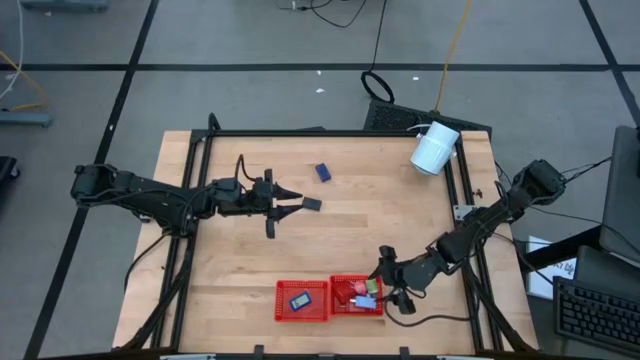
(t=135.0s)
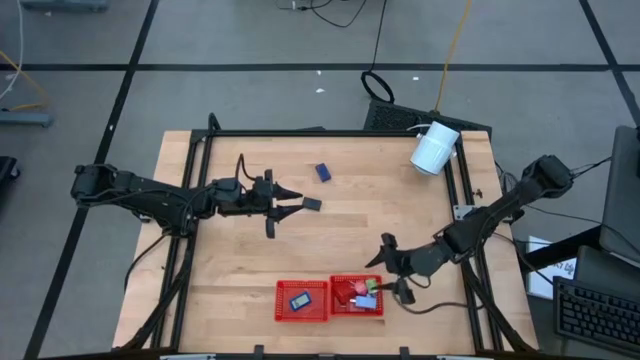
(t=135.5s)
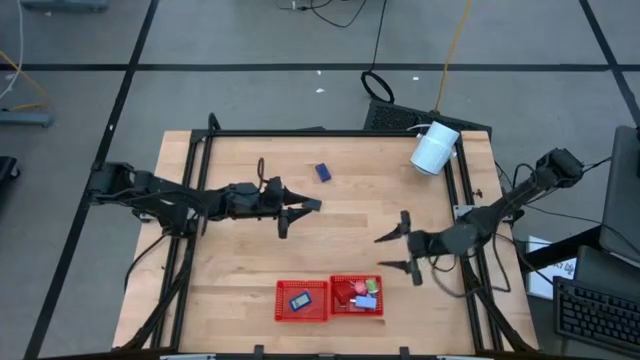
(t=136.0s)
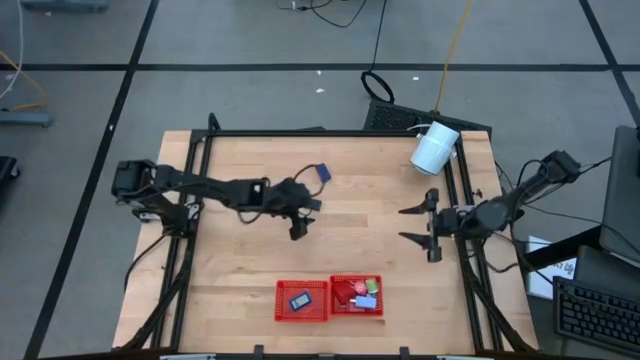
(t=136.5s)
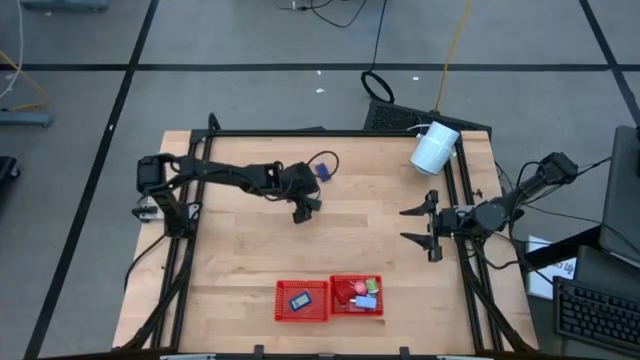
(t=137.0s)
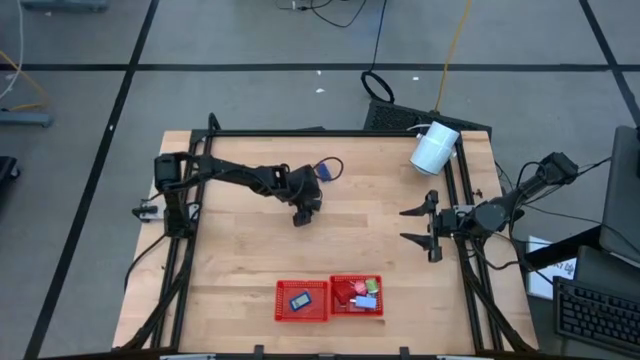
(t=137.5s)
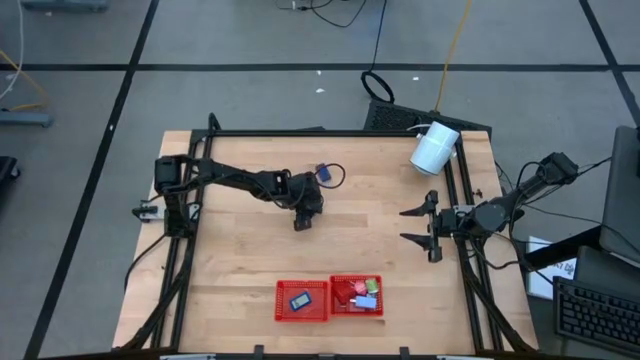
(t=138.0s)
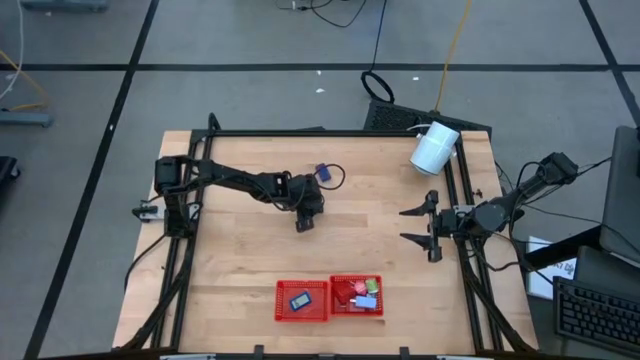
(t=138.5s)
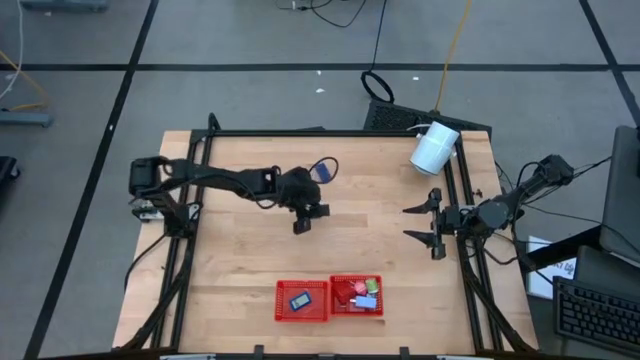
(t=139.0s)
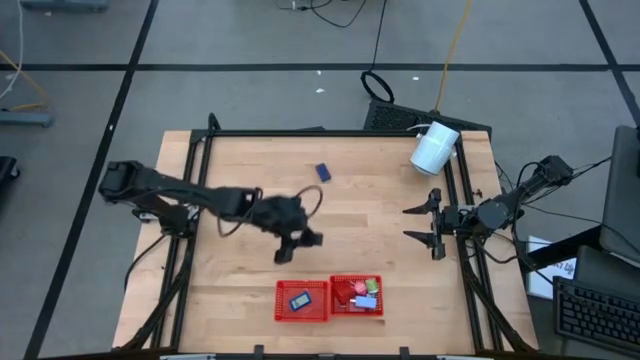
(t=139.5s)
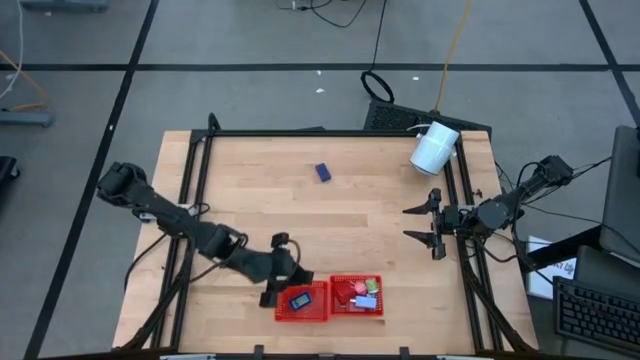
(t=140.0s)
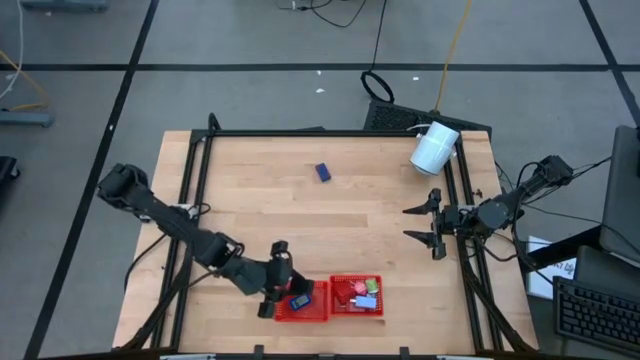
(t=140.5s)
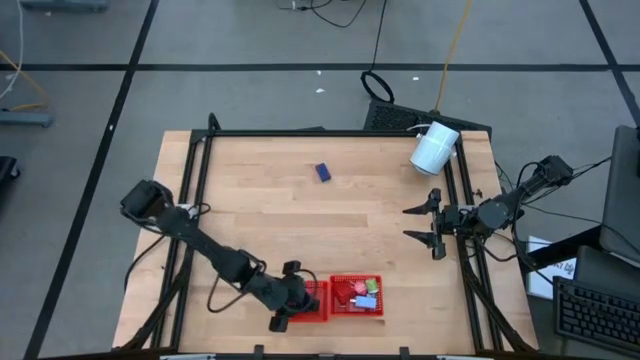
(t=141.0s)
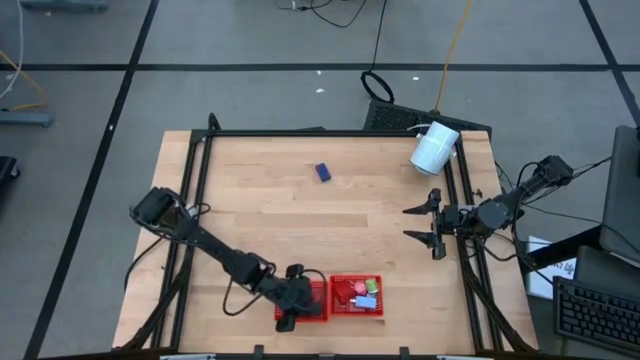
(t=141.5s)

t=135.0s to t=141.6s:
Task: Pick & Place Office items
Put the black digital timer into the left red bin

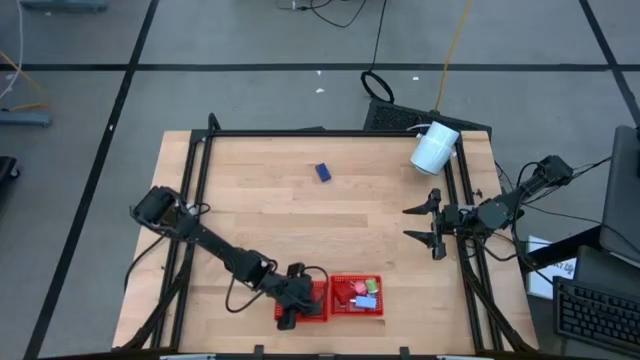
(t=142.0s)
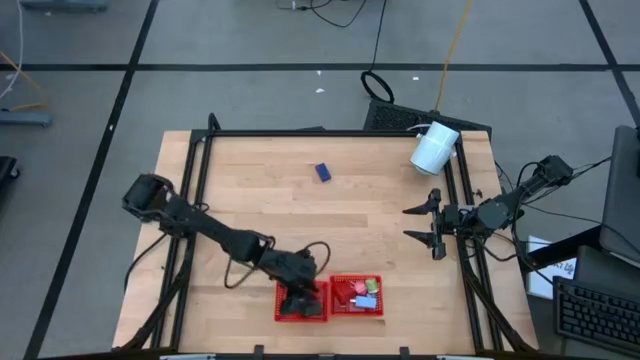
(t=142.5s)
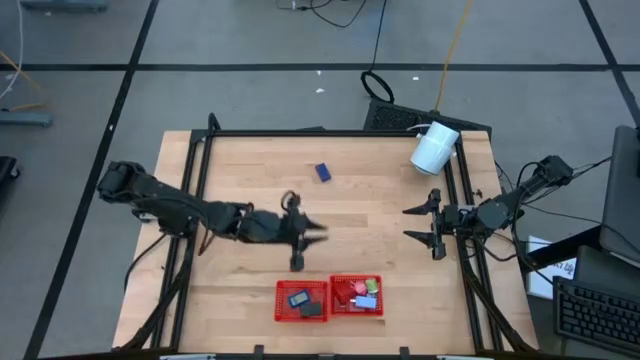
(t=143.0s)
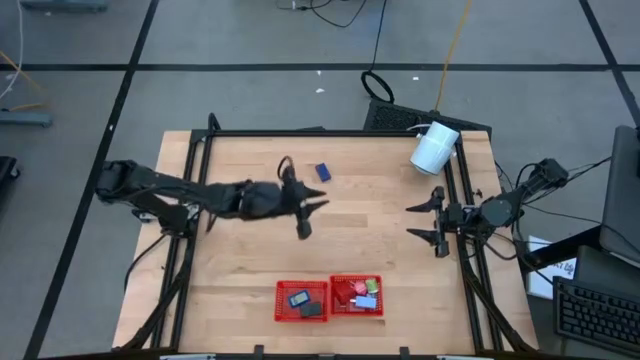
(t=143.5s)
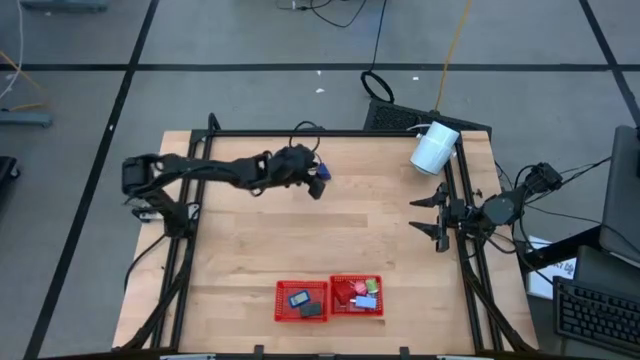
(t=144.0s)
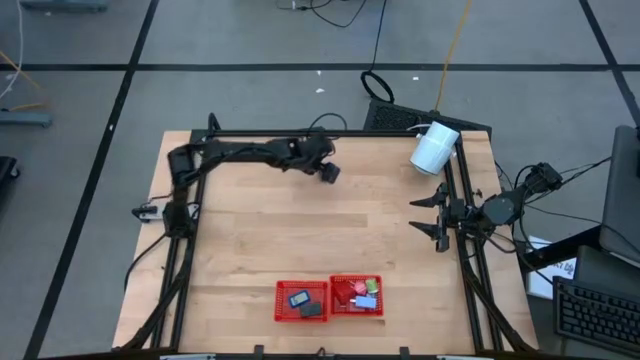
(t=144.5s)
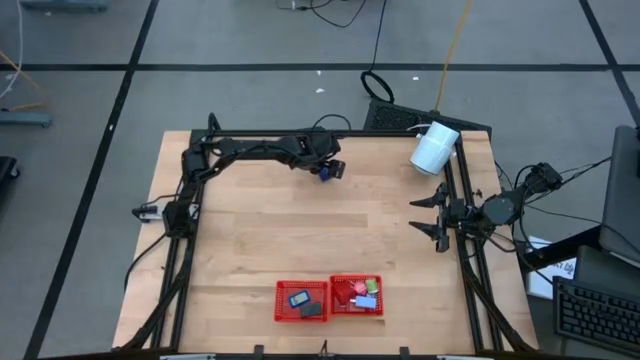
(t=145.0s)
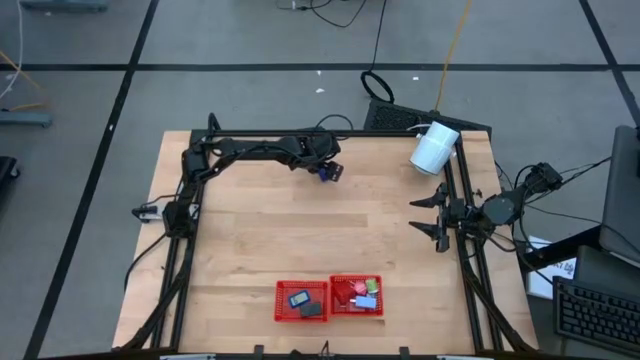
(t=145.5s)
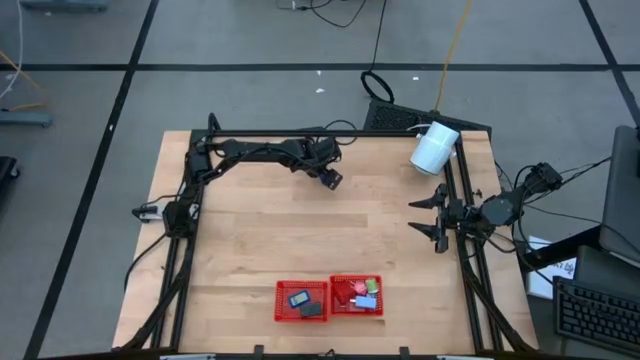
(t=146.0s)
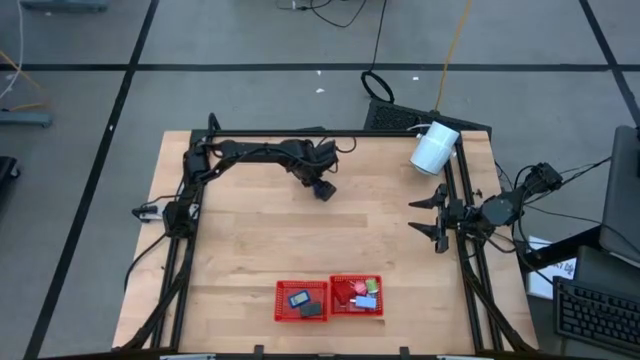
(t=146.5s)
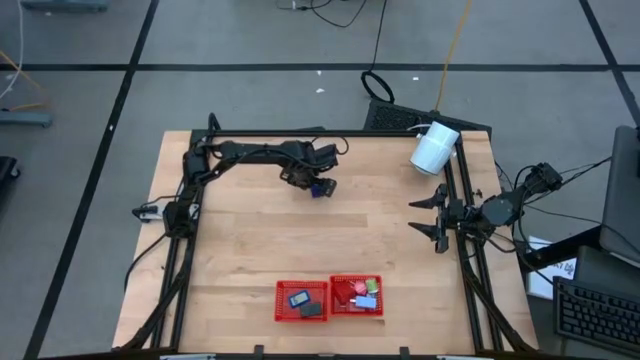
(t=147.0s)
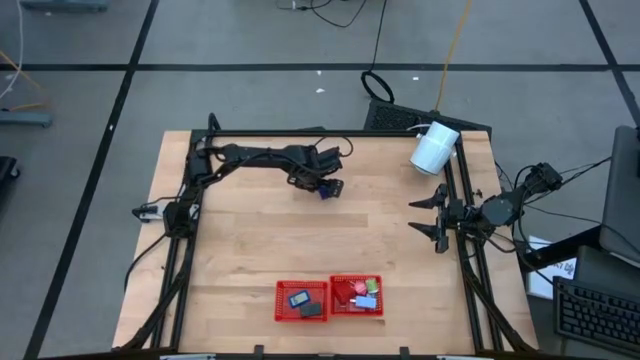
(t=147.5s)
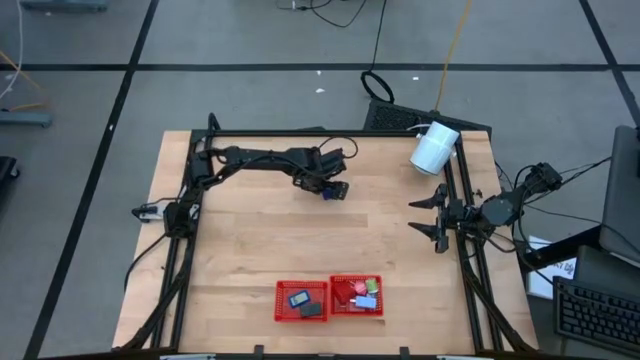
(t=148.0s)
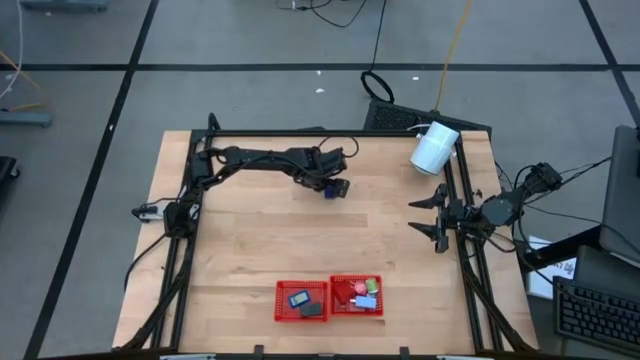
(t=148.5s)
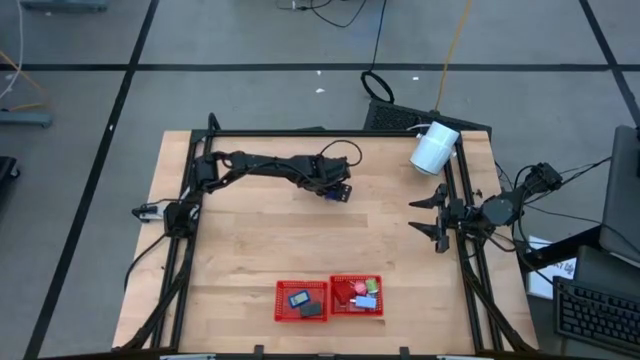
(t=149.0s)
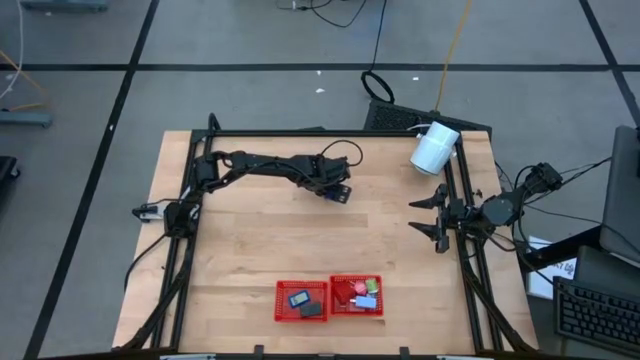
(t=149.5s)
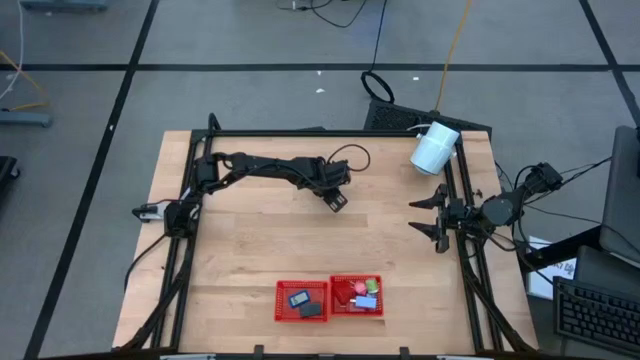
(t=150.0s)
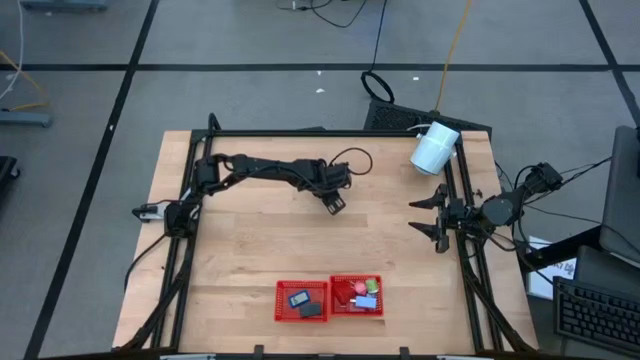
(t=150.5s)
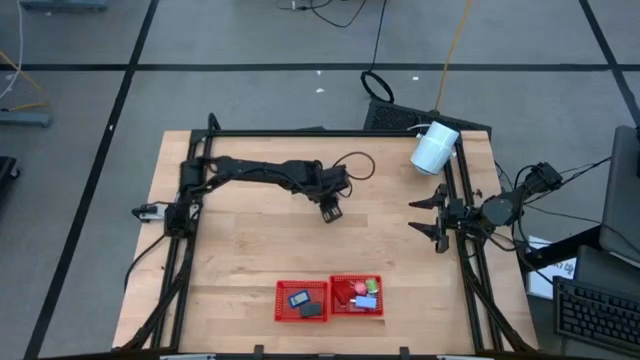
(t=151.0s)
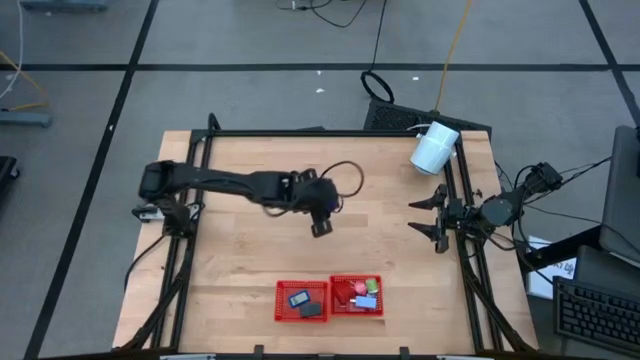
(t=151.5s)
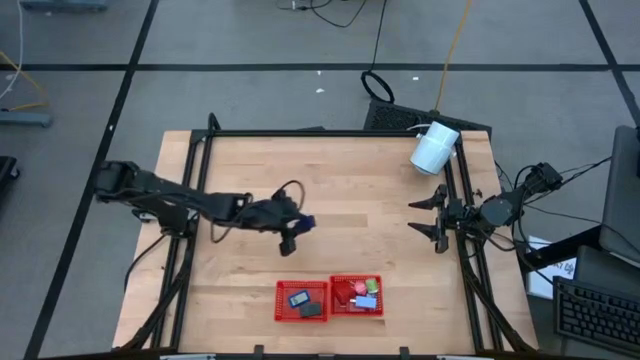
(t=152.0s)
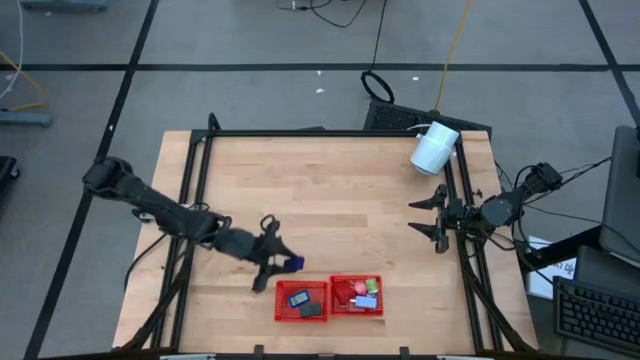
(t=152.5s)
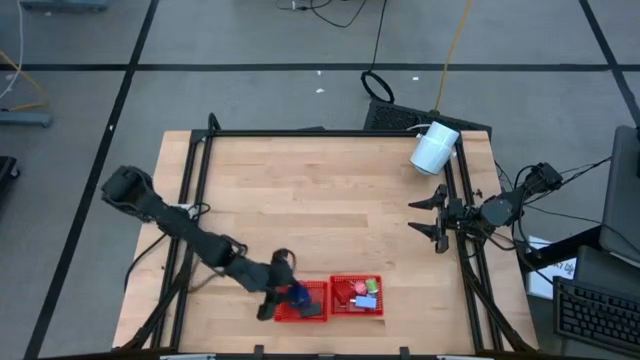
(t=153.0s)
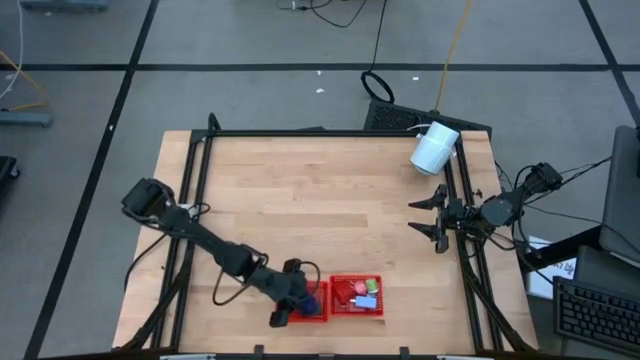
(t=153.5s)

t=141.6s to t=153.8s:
Put the blue digital timer into the left red bin

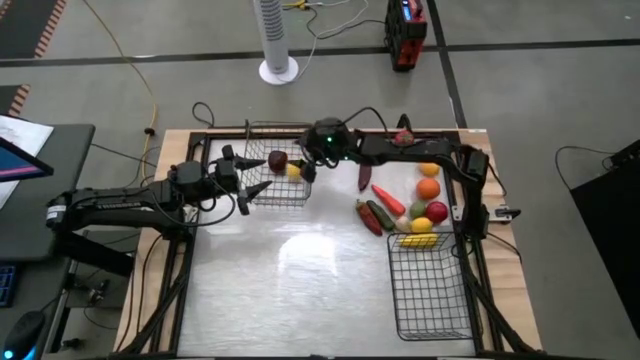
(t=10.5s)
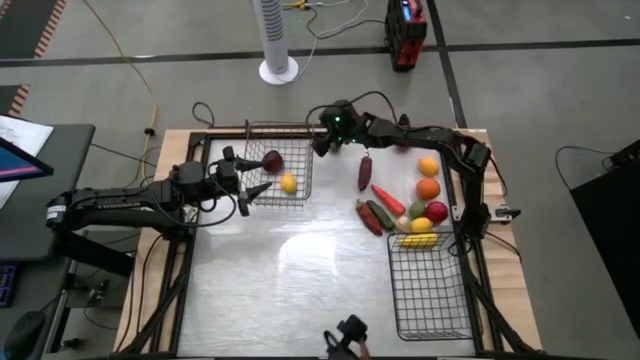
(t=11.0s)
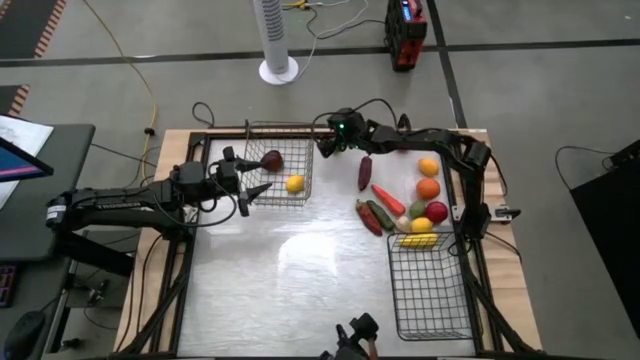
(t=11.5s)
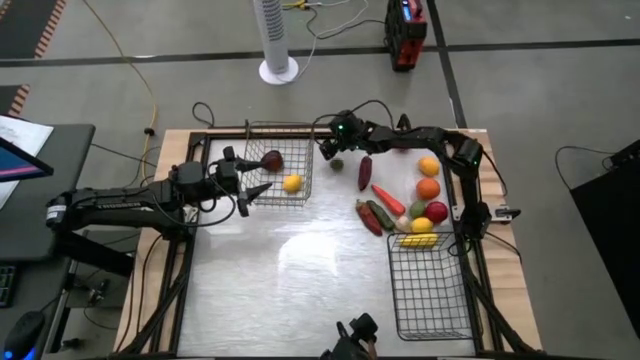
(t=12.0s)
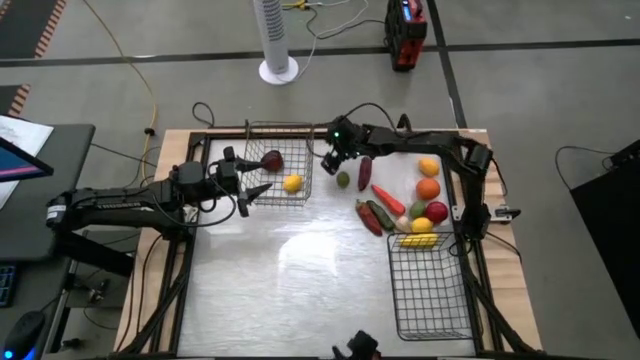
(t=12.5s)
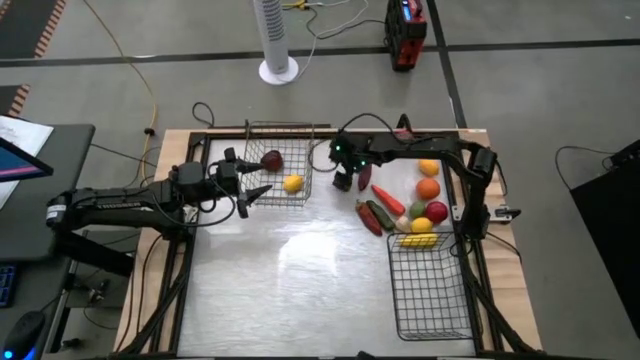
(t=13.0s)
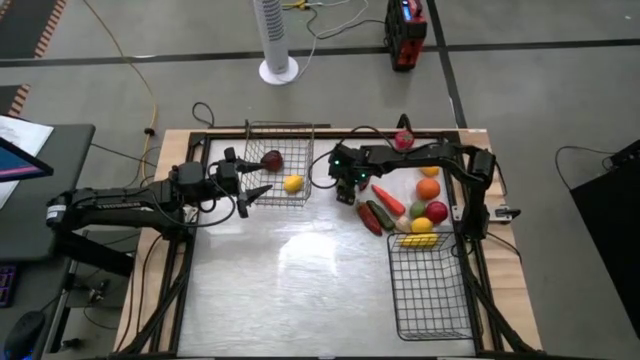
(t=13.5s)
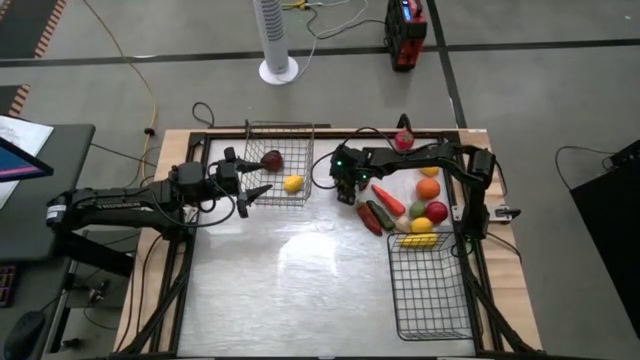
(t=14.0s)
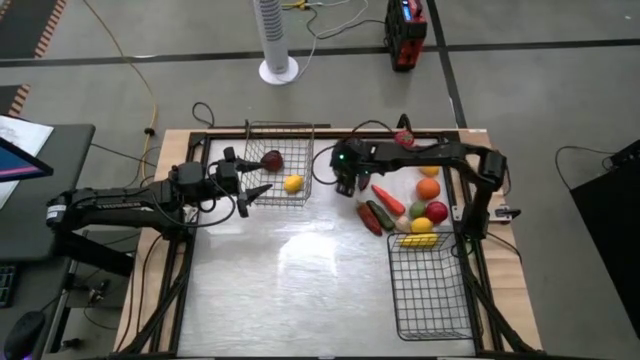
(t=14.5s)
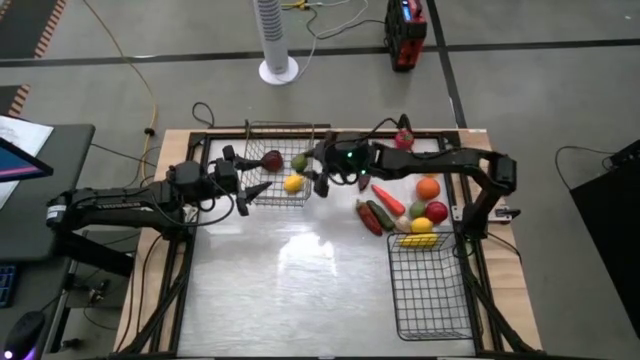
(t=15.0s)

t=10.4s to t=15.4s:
Task: Sort produce into baskets
Put the top green citrus into the wire basket
